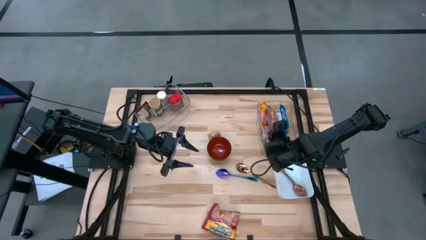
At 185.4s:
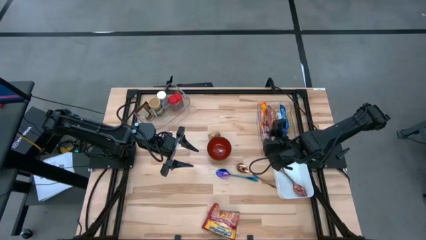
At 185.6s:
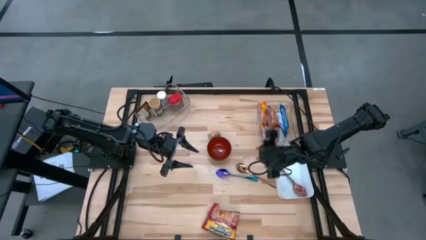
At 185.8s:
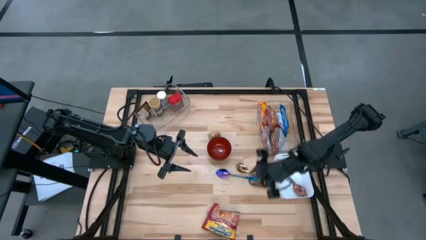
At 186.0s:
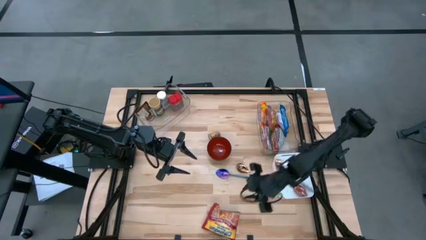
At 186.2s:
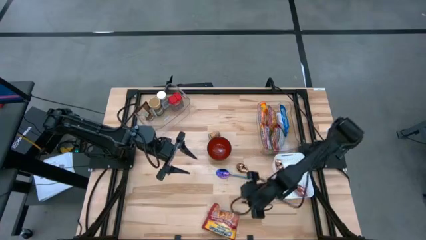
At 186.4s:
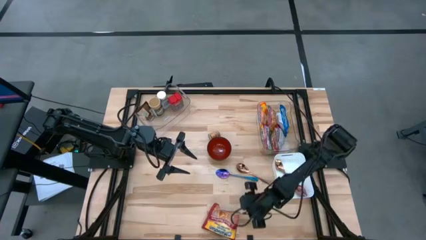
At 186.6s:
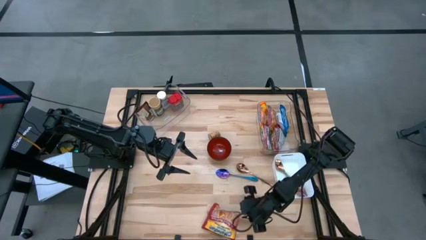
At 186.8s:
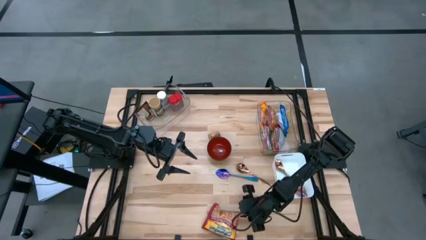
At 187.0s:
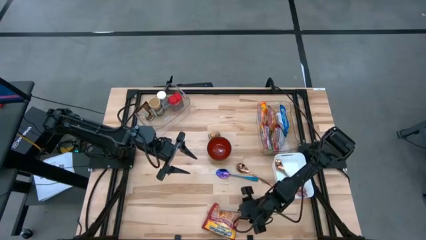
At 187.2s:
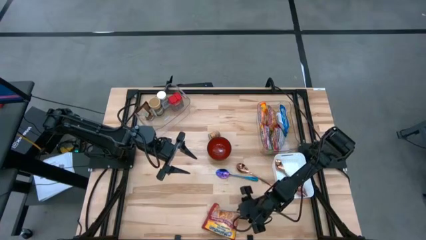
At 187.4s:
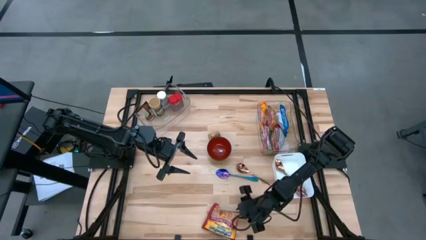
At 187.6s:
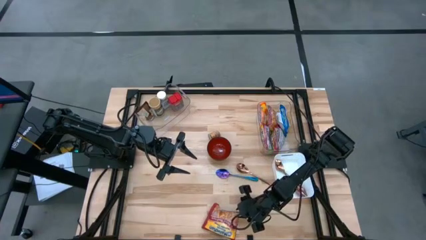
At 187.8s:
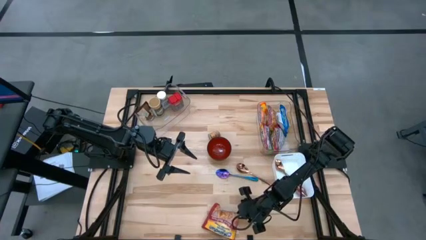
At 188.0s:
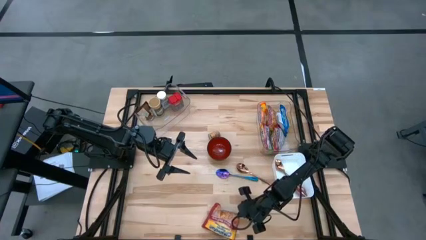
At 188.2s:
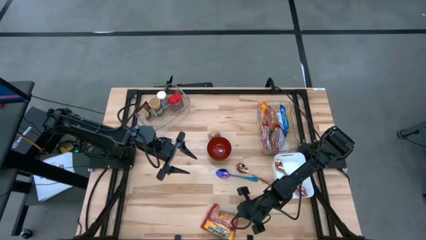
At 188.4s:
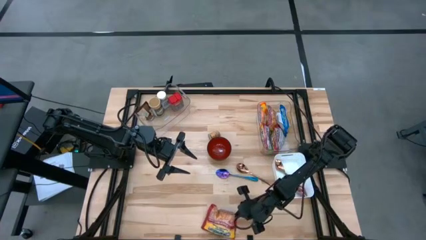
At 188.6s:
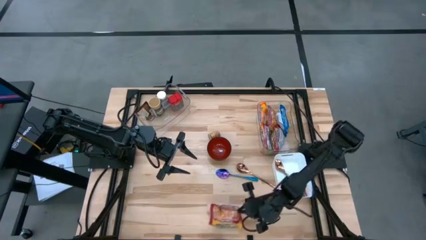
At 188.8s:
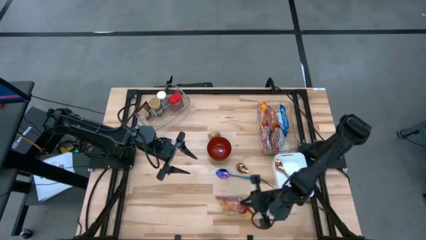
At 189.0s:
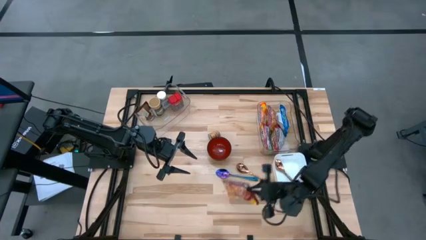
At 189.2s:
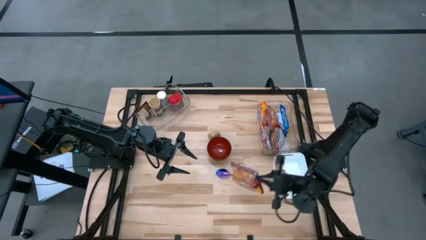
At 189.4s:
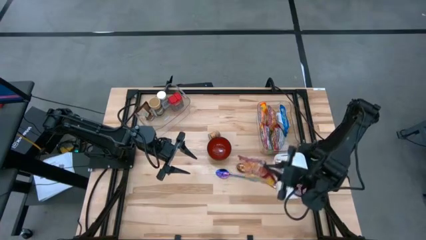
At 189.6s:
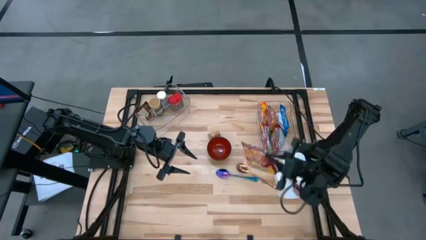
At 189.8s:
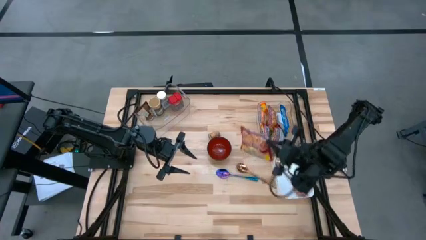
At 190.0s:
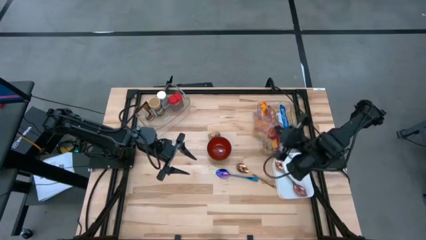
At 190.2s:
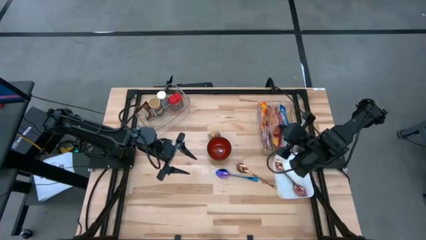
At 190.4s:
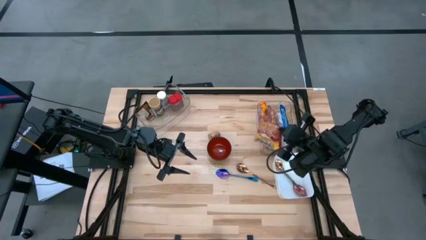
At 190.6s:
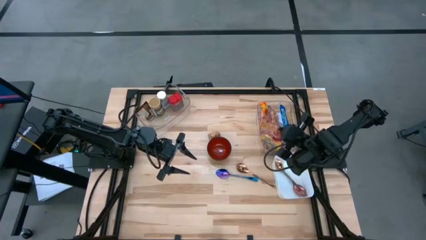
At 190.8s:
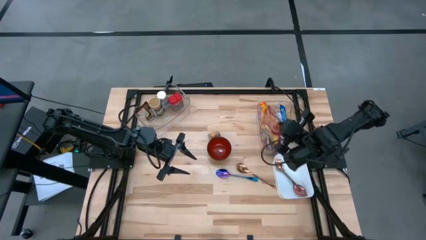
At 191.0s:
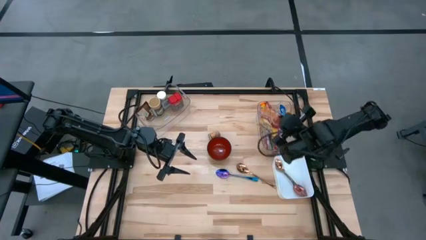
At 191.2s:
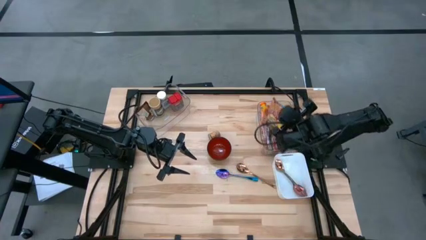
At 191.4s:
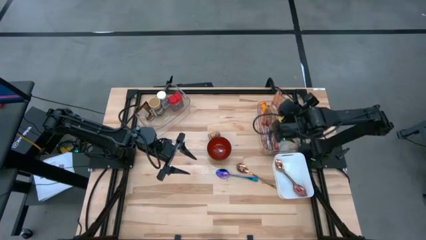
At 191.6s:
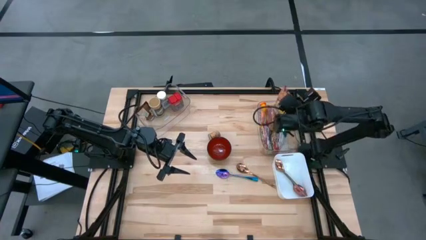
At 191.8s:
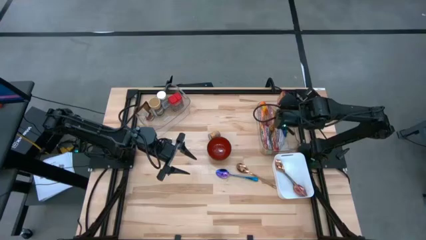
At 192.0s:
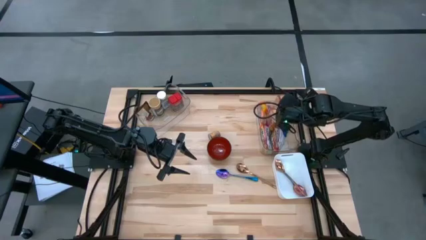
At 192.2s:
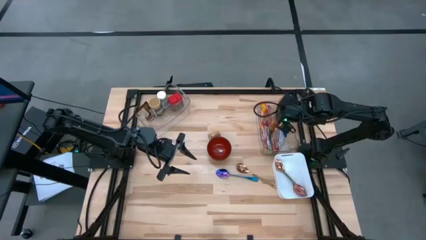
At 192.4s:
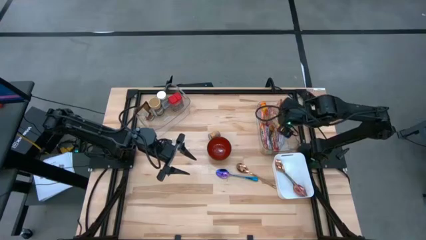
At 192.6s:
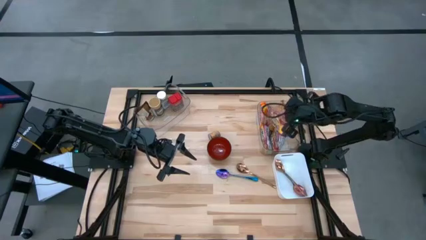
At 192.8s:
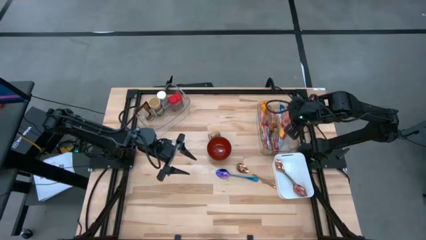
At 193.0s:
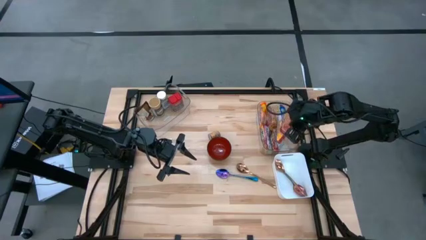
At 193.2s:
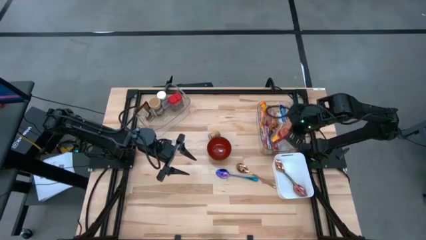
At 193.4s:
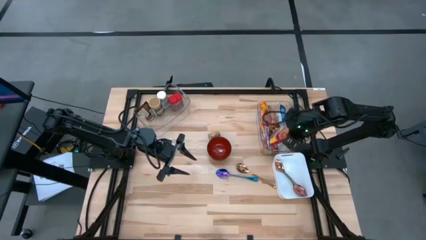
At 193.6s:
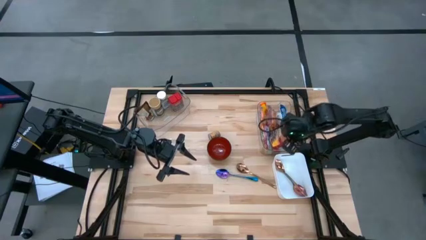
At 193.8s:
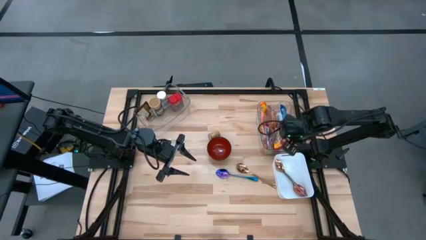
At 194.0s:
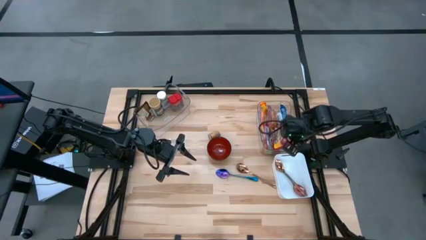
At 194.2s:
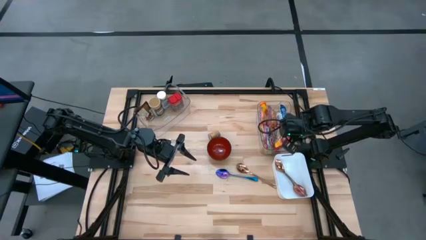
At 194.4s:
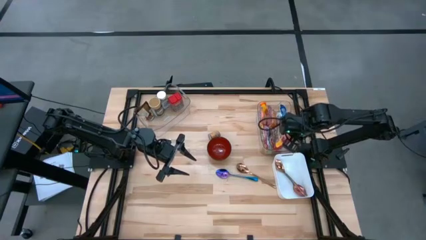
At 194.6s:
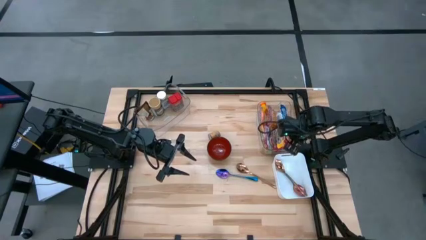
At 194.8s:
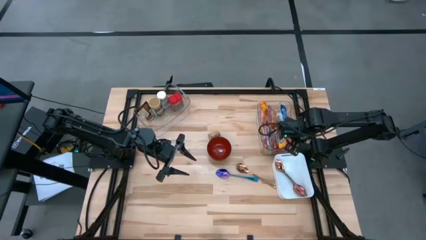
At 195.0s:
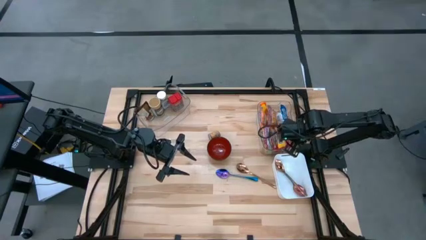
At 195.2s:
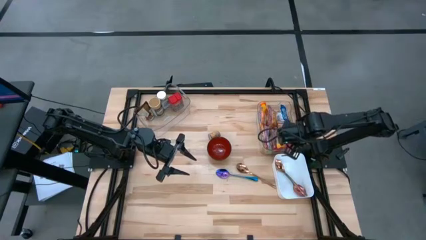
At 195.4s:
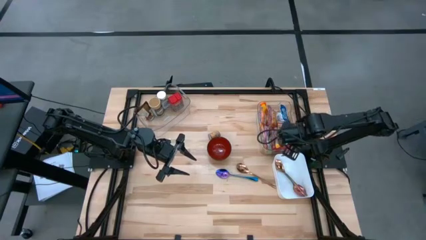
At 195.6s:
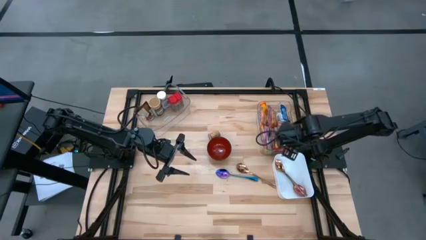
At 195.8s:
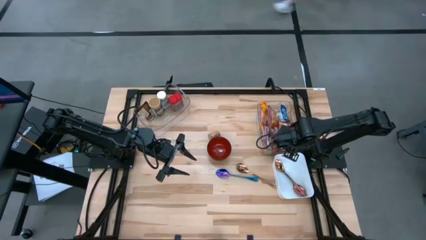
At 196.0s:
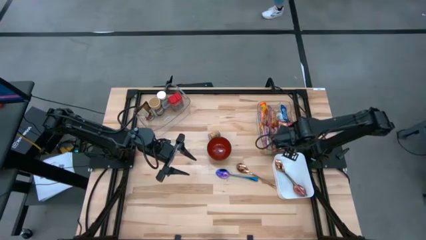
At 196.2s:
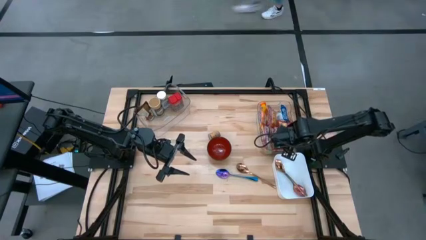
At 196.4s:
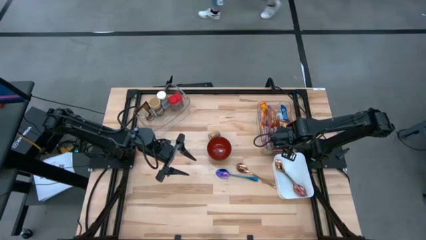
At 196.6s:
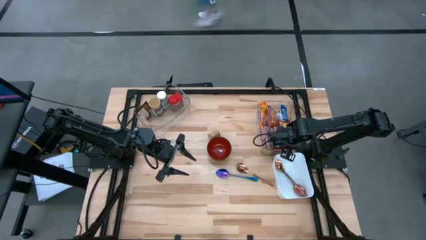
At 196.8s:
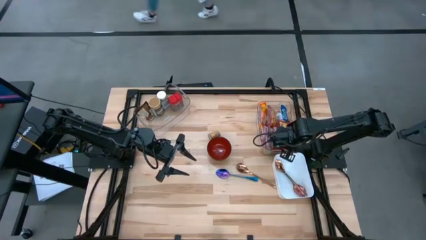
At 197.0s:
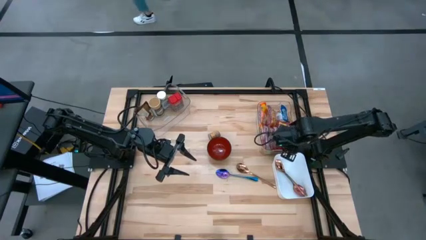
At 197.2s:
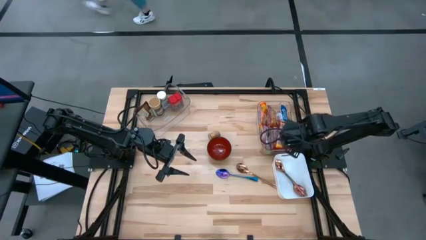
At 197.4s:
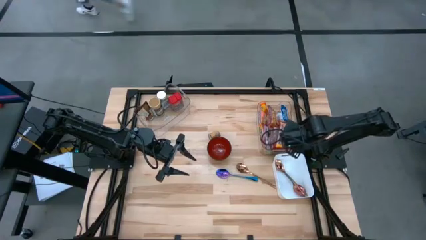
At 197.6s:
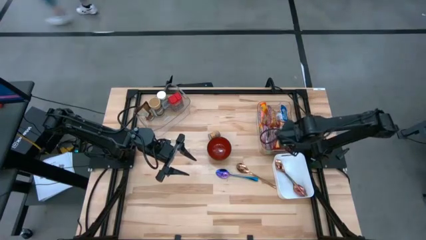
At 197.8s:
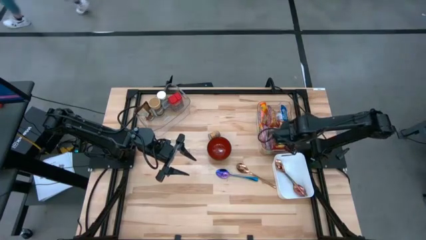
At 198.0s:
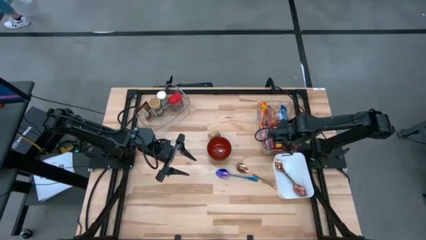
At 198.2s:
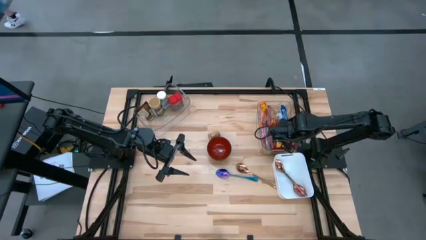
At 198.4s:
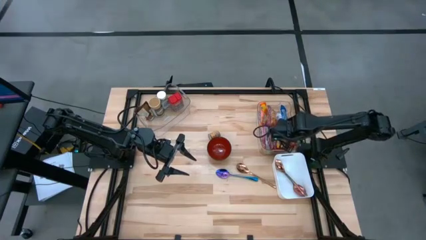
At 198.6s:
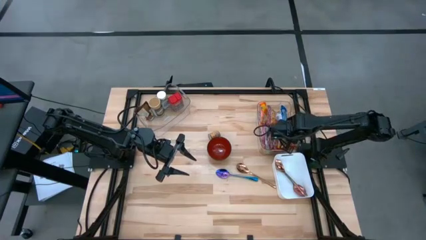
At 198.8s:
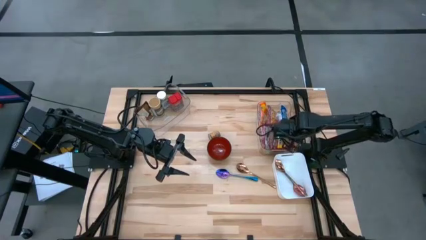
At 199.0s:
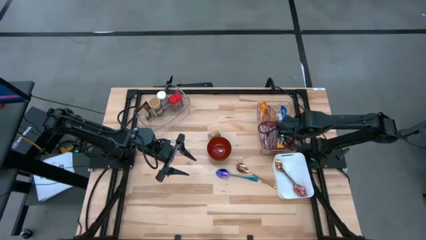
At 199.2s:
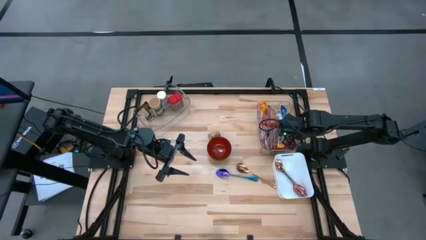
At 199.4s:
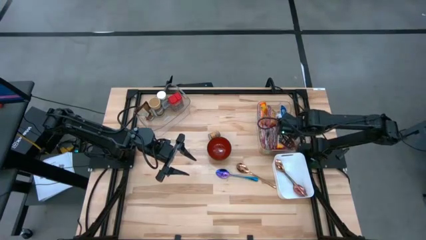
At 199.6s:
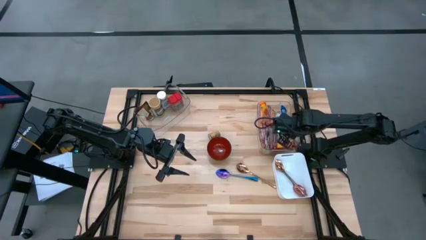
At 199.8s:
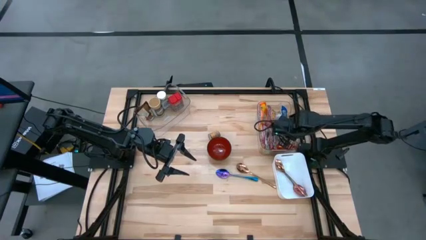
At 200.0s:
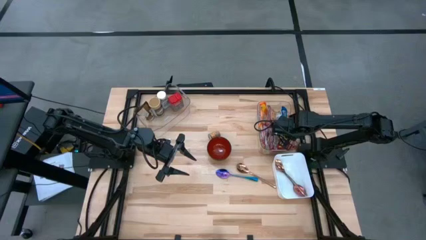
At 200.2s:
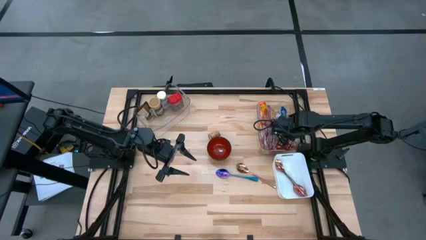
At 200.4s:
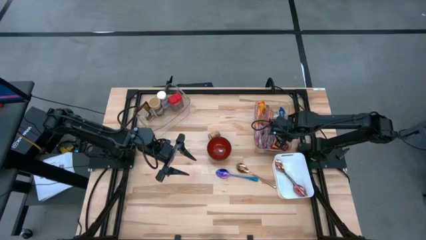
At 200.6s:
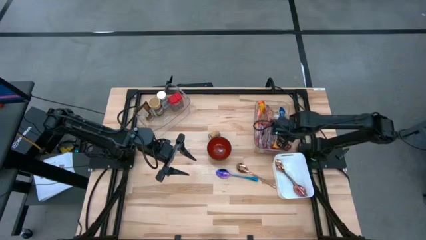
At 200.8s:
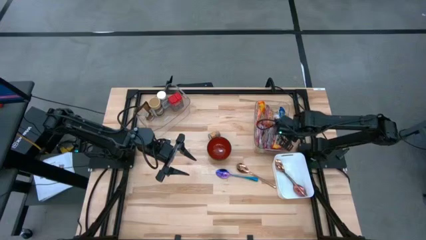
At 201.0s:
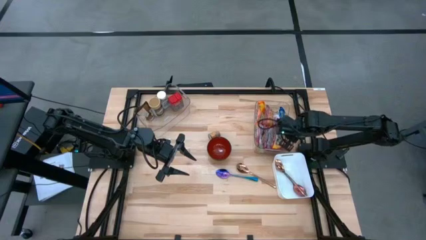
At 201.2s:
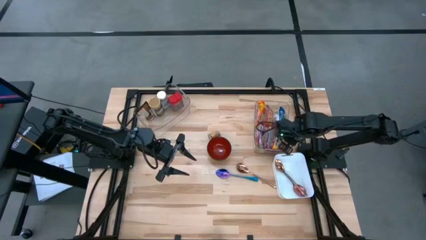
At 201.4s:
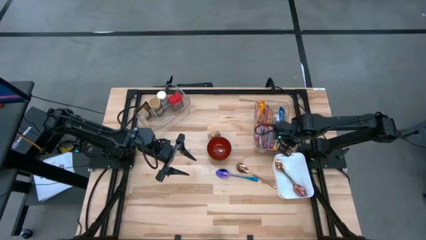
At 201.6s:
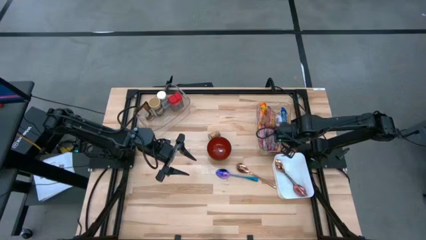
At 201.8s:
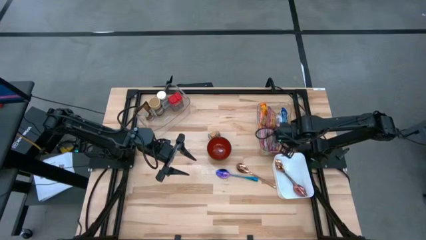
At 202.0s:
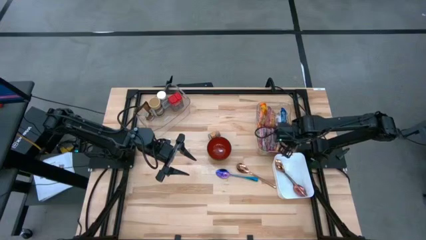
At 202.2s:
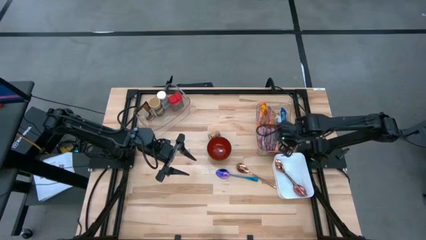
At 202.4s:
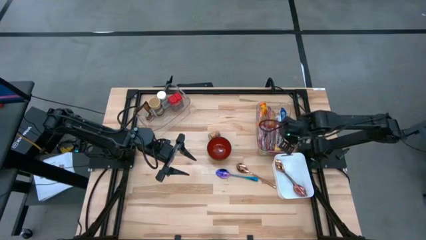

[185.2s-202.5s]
Task: Pick & Place Food Item
Put the red noodle pack into the right transparent bin

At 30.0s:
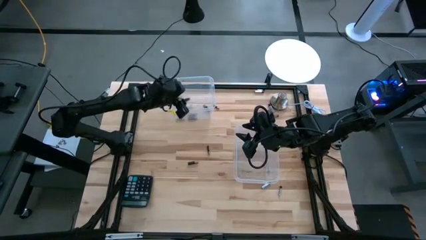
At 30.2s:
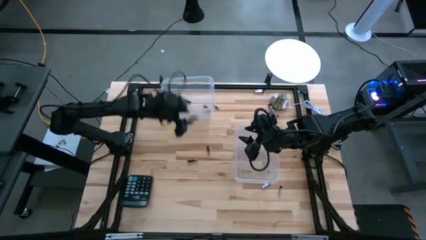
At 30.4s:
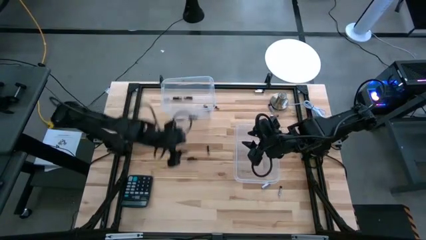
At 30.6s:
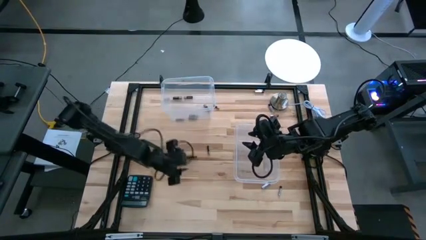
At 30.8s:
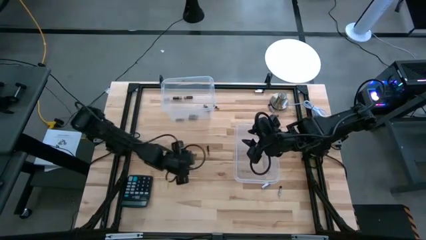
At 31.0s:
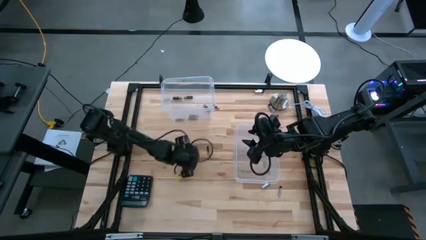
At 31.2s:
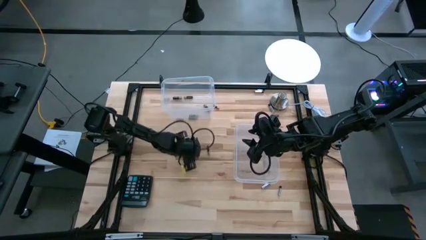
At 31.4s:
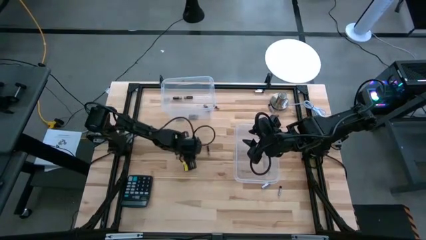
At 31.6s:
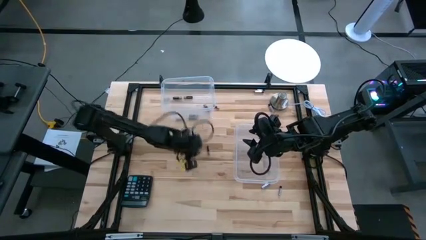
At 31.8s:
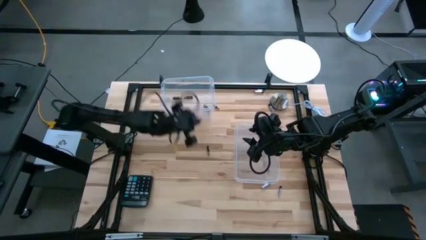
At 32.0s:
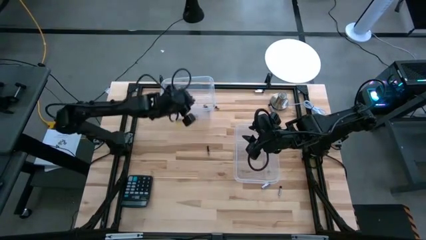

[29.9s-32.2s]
Task: Sort batteries
Put the black battery into the left transparent bin
